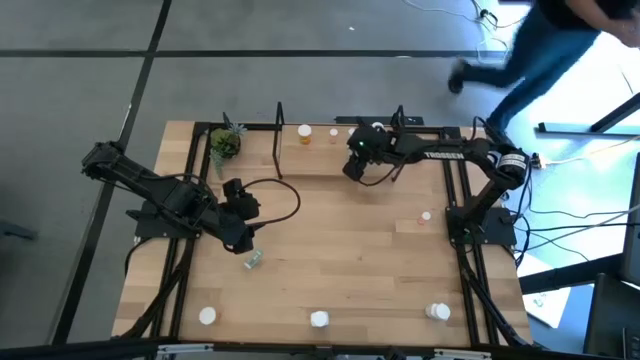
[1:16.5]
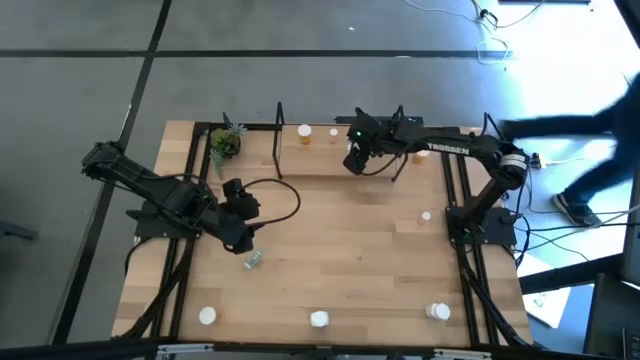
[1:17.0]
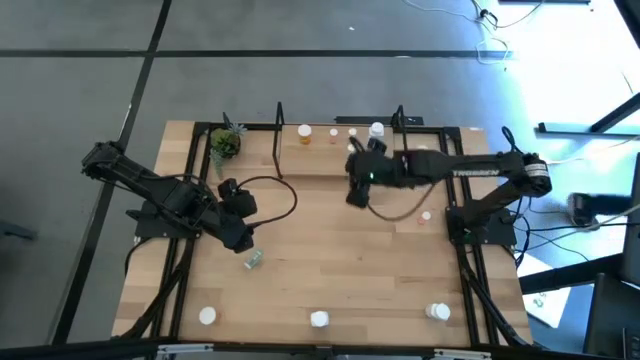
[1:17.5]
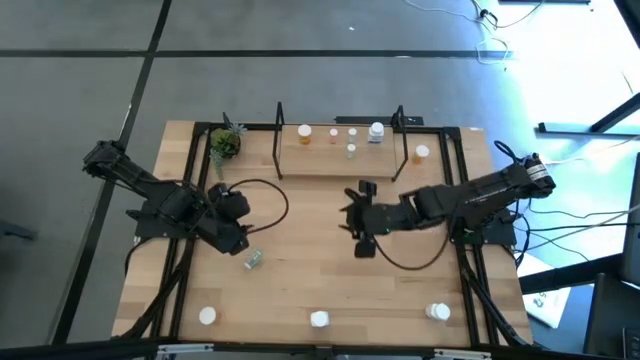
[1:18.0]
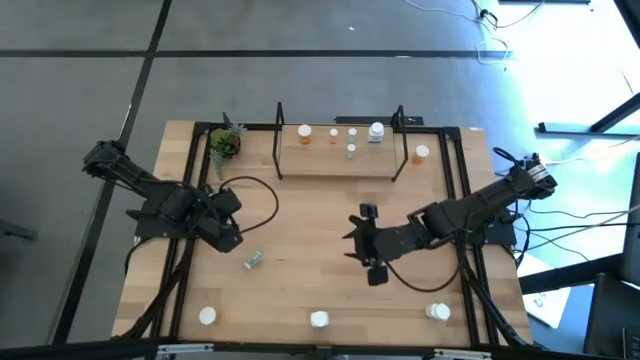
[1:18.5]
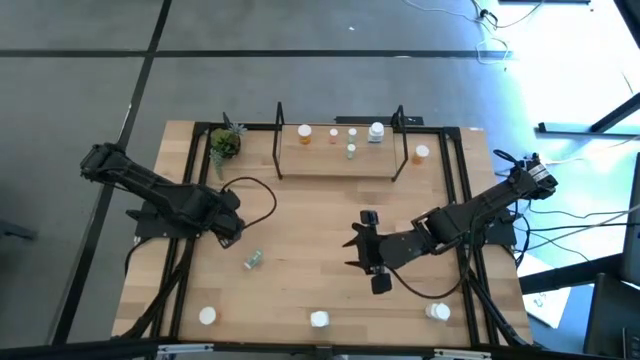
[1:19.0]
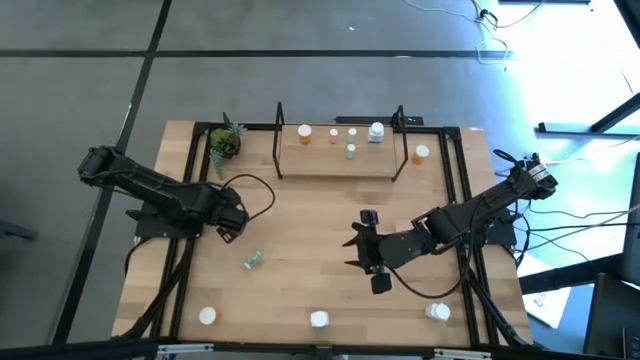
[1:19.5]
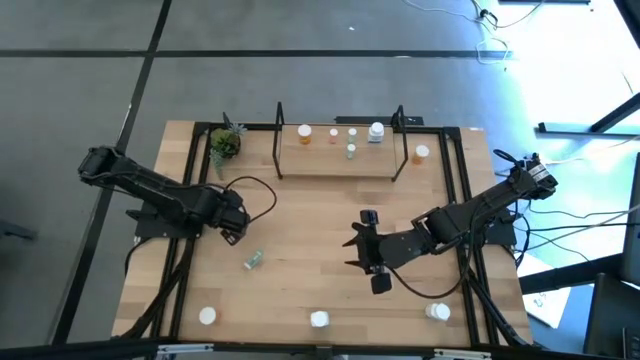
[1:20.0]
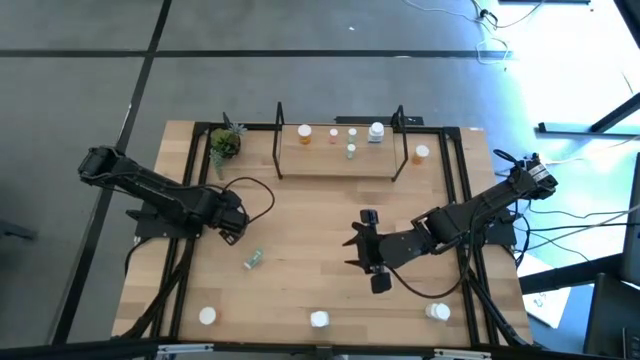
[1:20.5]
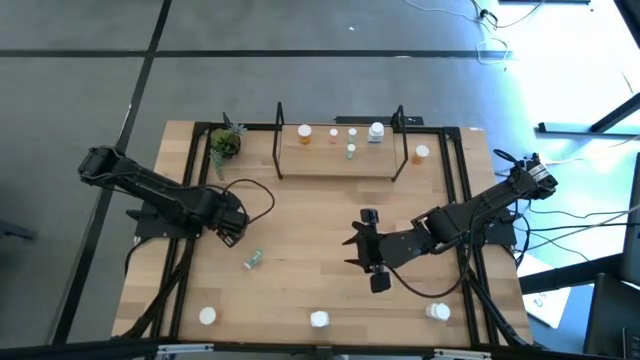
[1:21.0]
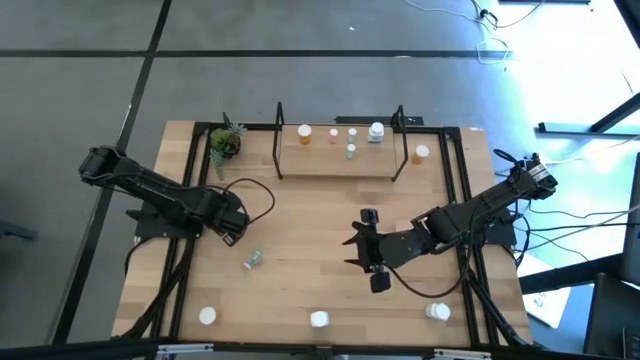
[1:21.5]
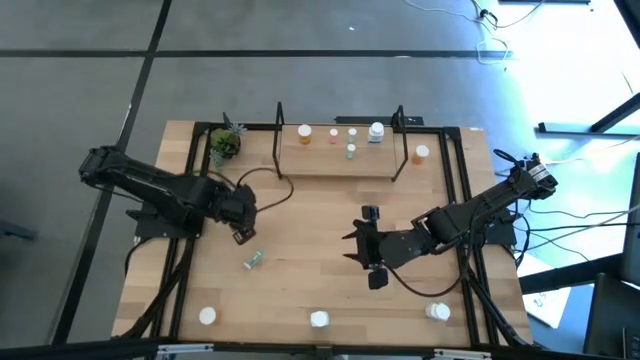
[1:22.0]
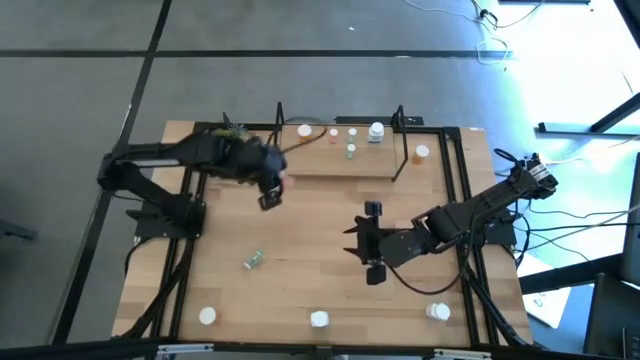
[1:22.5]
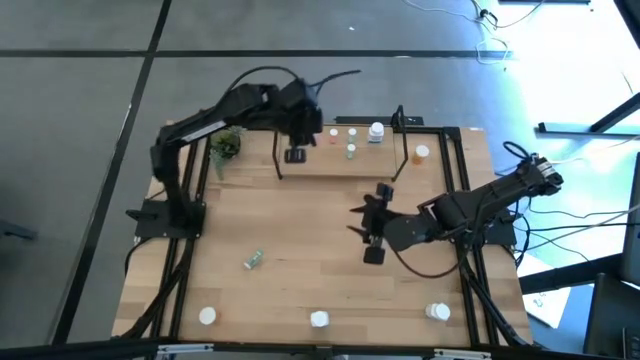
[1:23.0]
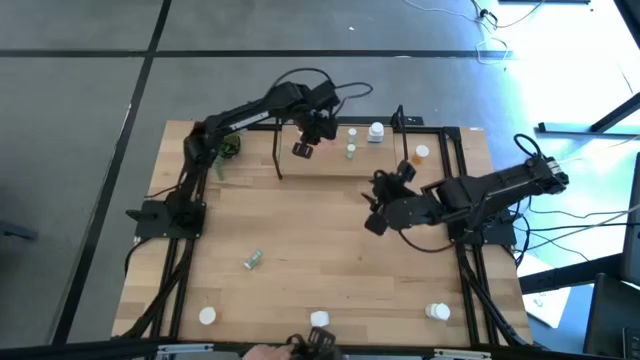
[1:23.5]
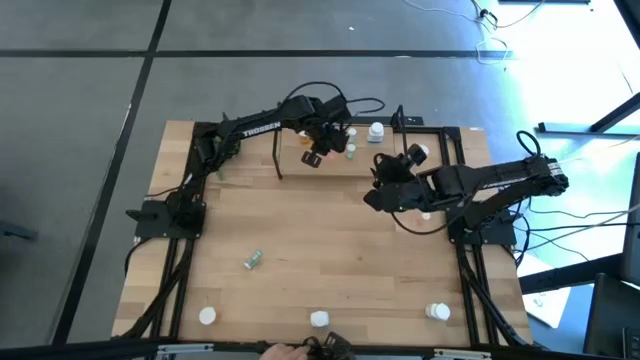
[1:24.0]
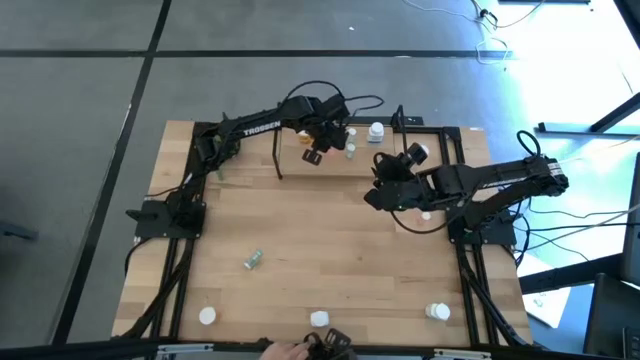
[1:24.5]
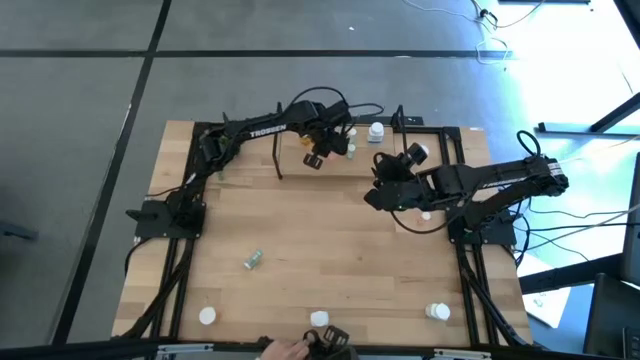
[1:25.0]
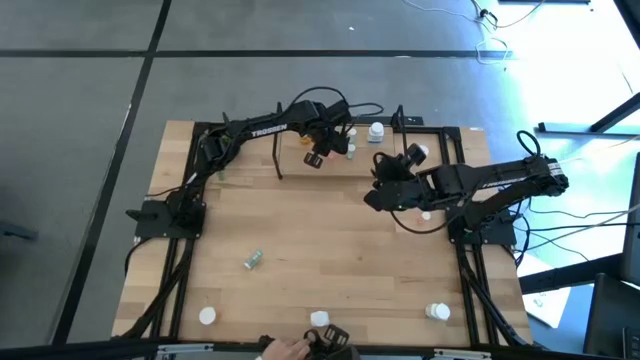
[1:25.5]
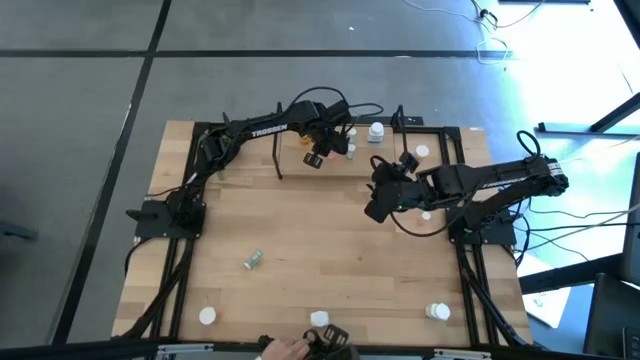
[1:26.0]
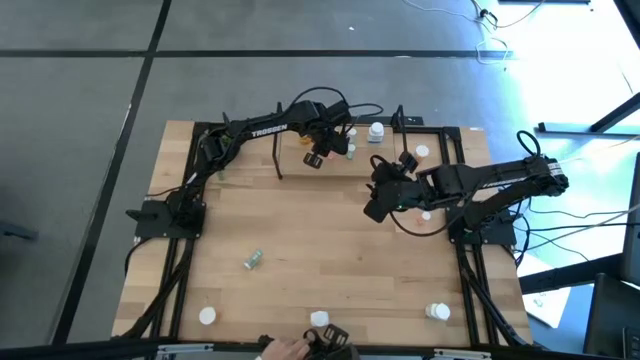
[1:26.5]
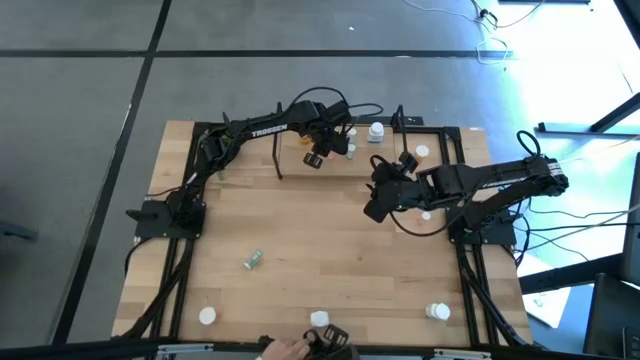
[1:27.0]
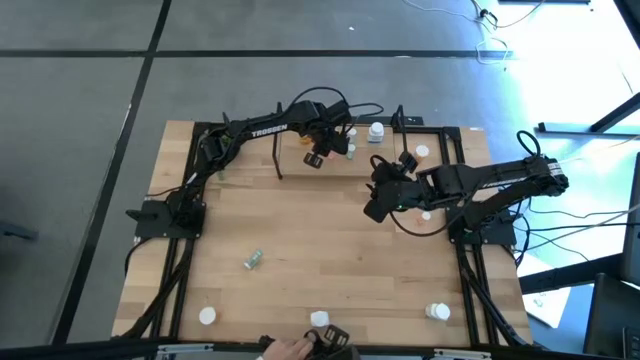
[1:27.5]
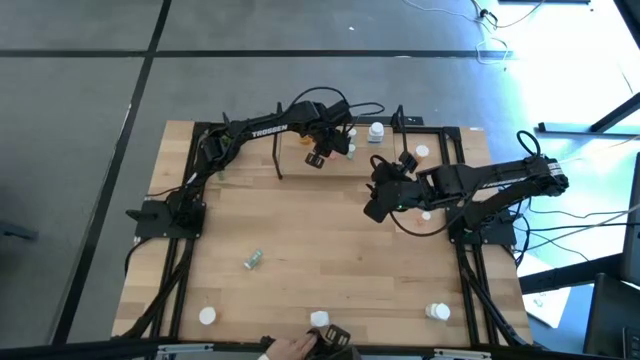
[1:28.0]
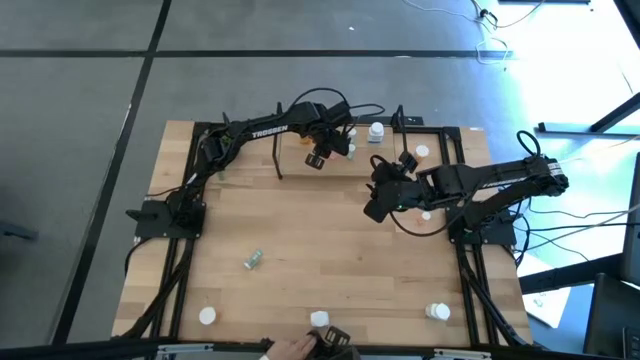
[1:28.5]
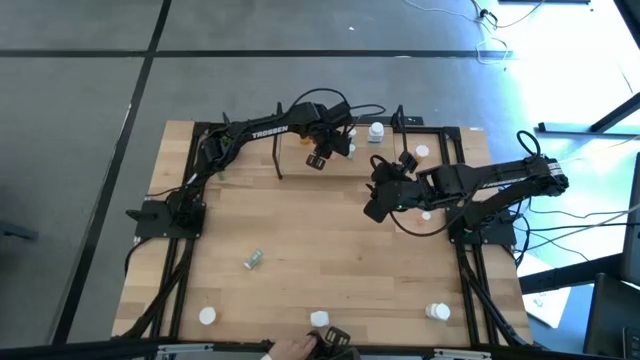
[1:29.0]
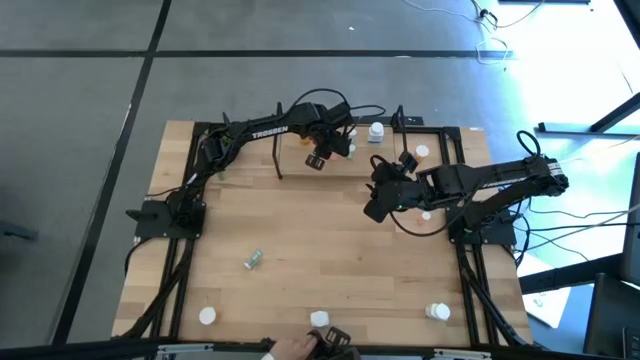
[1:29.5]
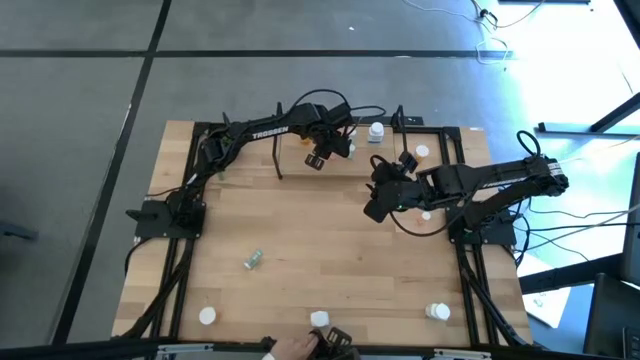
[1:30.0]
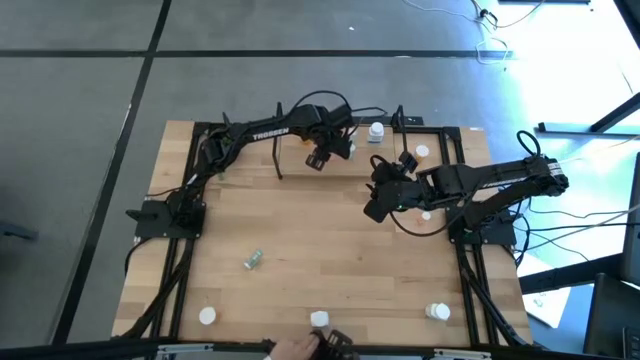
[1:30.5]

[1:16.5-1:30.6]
Task: Pick and place medicine bottles onto shelf by color
Put the left pink pill bottle on the shelf aligned with the pink bottle

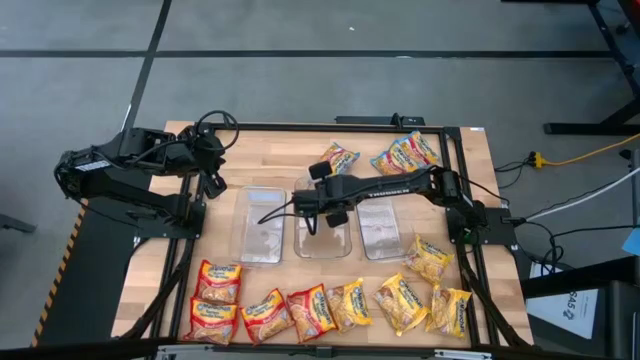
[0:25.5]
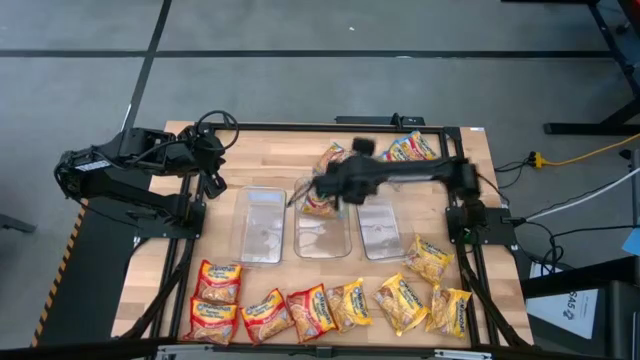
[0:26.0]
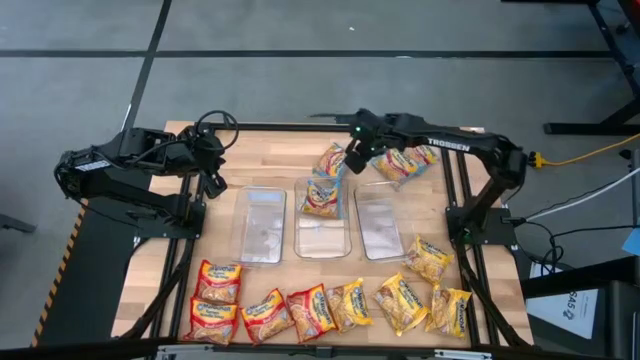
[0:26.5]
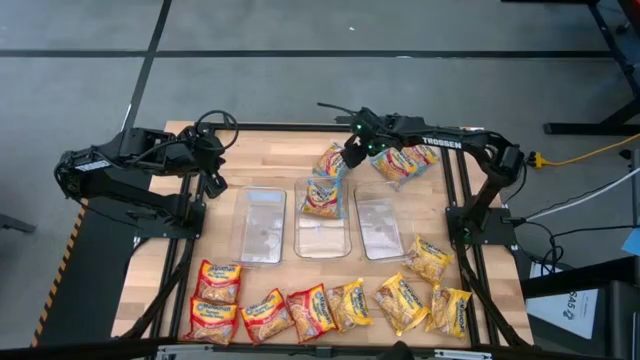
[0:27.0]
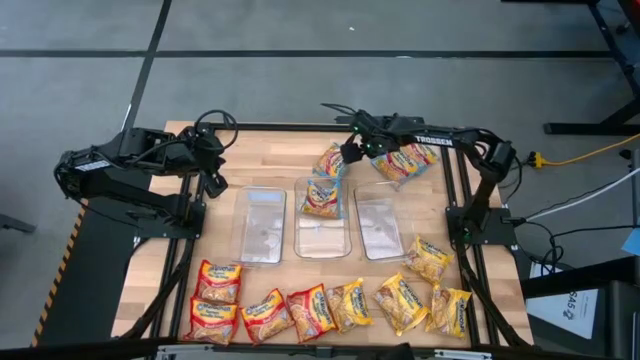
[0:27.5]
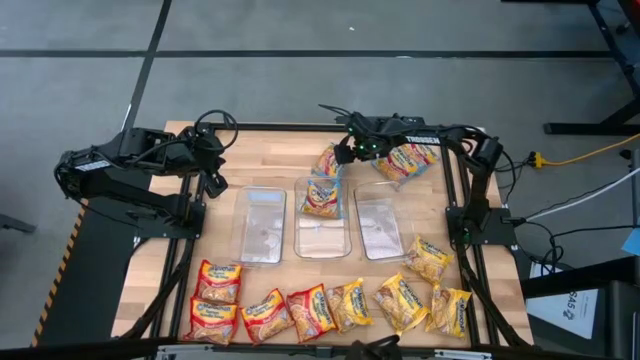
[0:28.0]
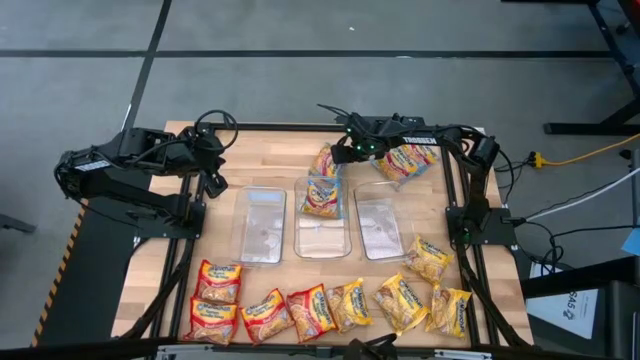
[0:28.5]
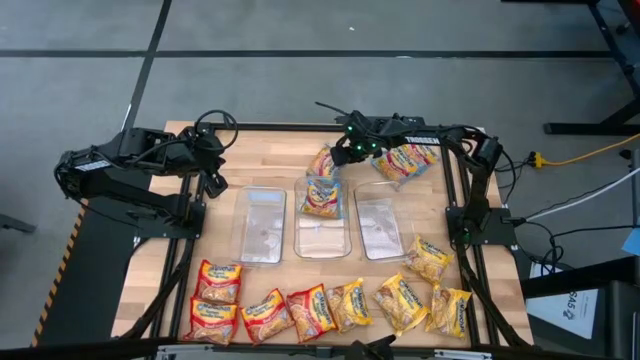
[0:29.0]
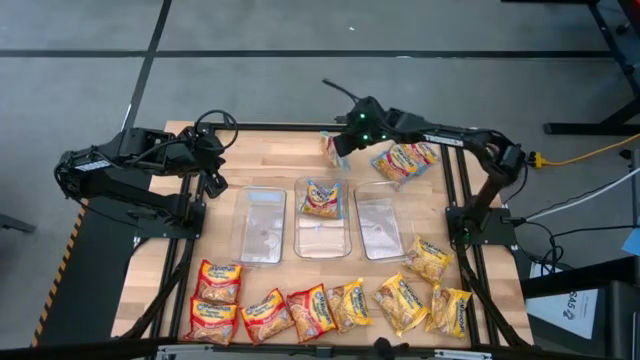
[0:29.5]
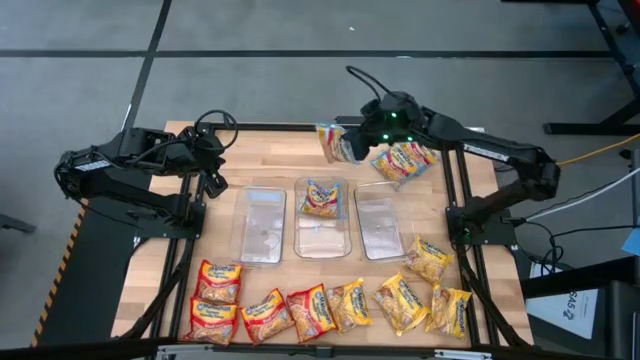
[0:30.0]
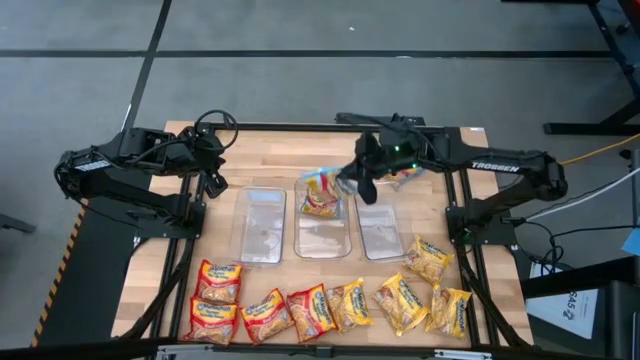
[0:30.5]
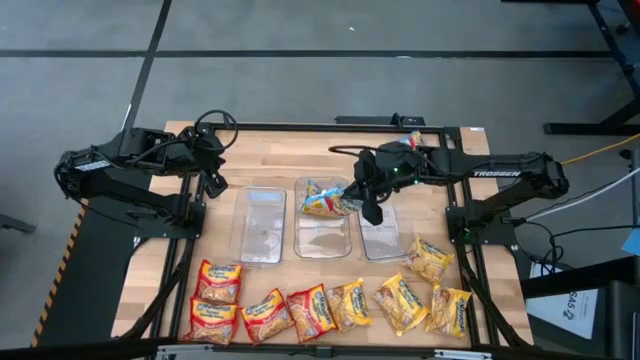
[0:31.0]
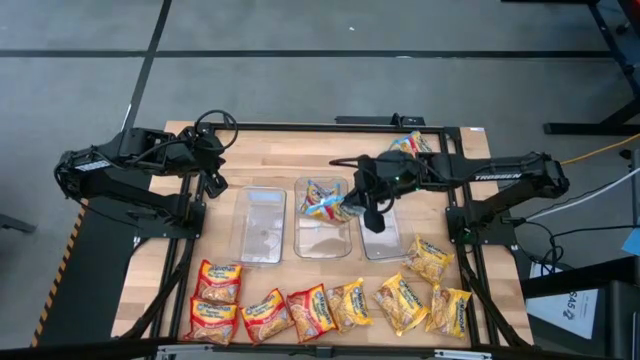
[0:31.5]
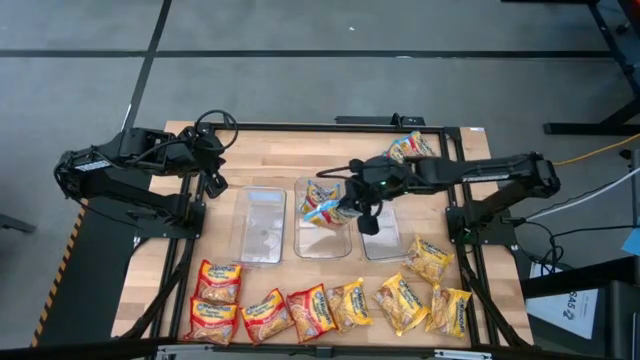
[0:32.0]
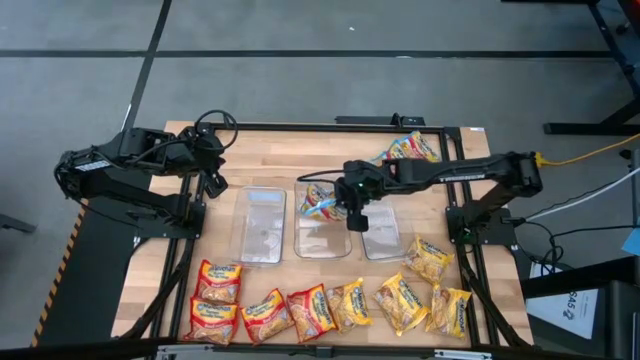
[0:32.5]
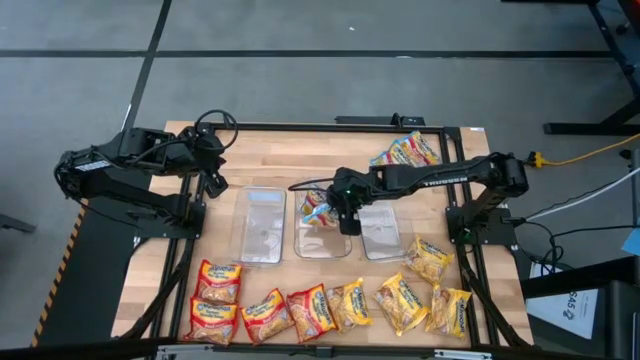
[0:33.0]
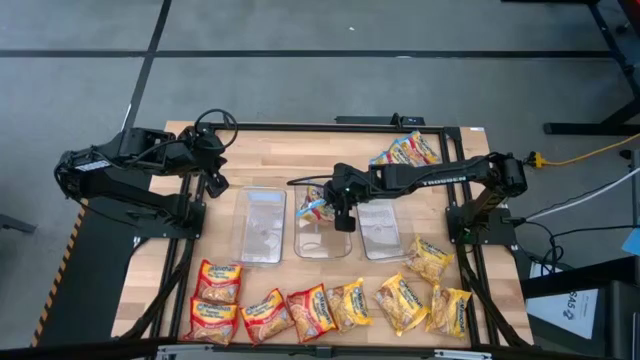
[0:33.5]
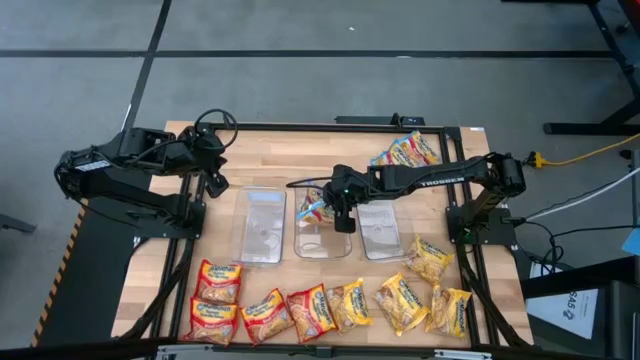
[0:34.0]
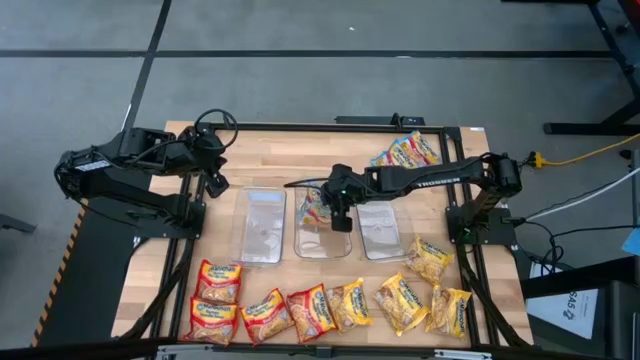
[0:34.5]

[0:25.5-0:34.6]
Task: Sort Maruchan noodles
Put the blue noodle pack into the middle transparent bin
